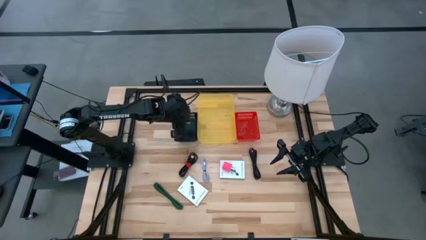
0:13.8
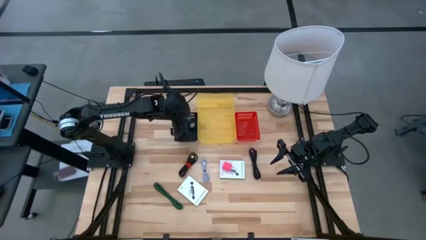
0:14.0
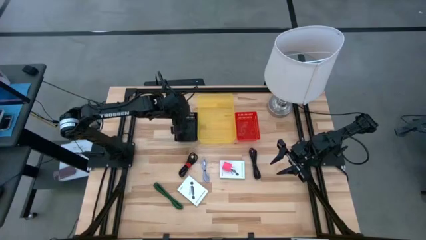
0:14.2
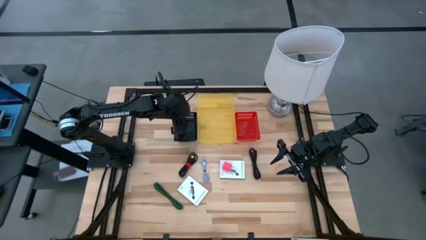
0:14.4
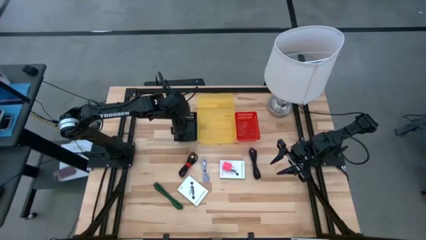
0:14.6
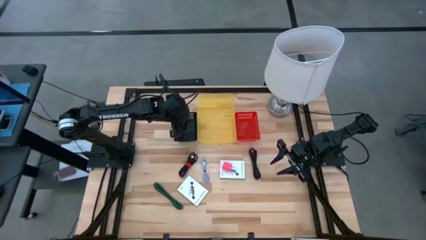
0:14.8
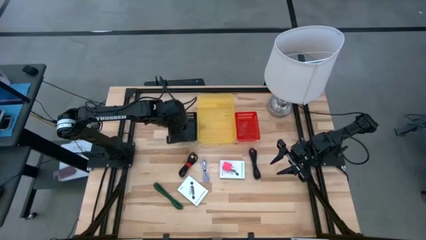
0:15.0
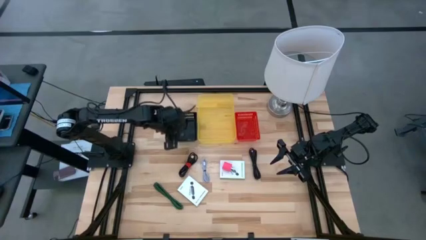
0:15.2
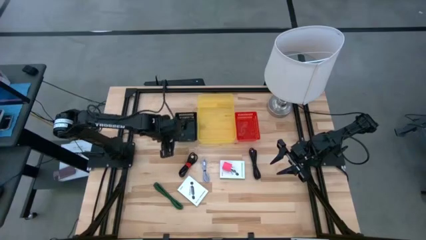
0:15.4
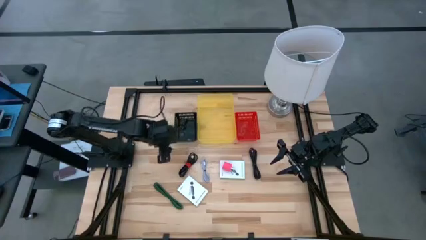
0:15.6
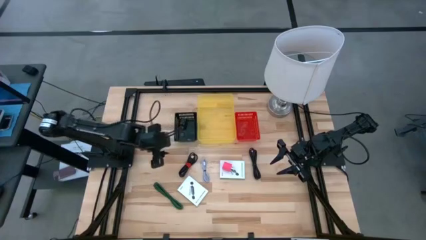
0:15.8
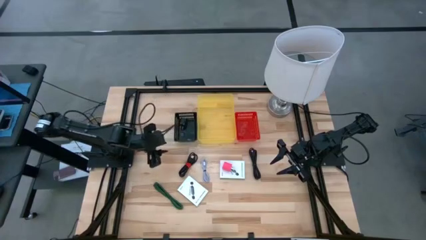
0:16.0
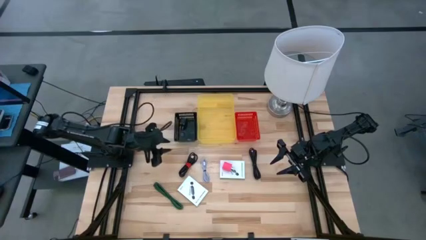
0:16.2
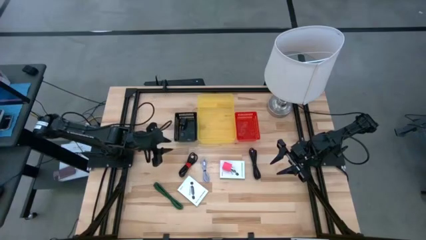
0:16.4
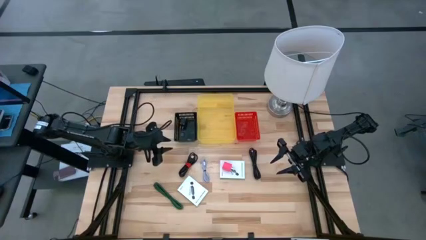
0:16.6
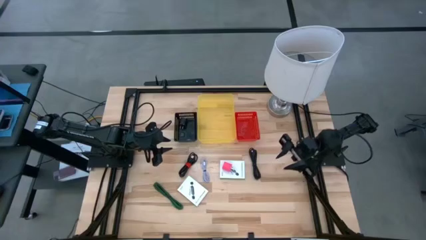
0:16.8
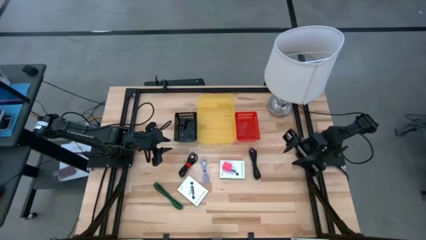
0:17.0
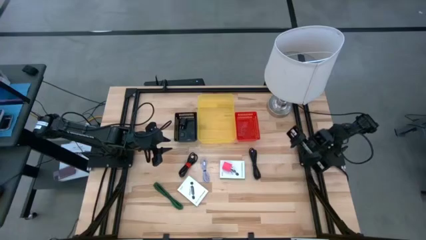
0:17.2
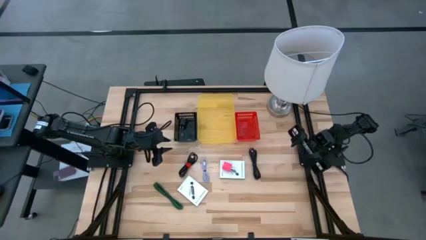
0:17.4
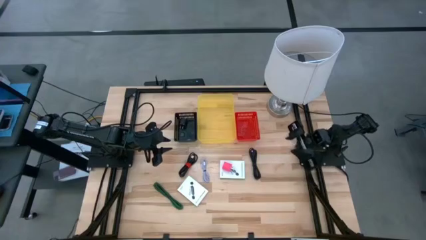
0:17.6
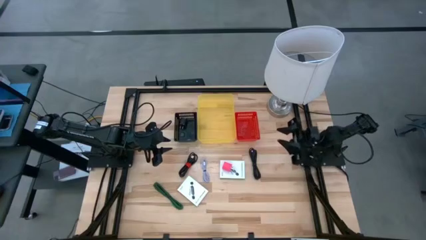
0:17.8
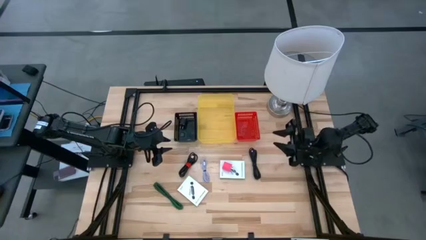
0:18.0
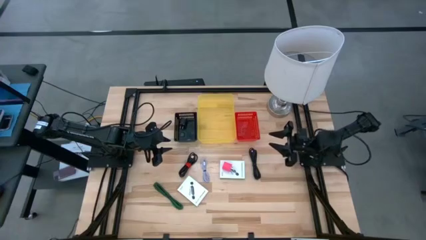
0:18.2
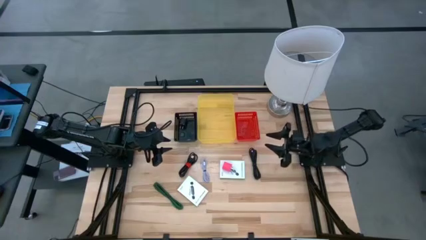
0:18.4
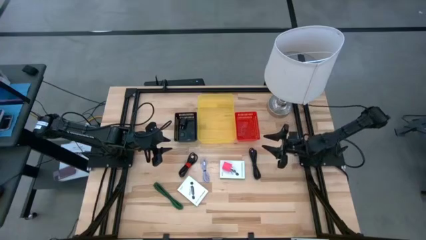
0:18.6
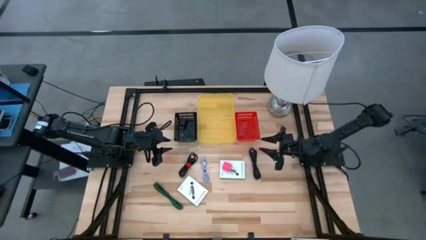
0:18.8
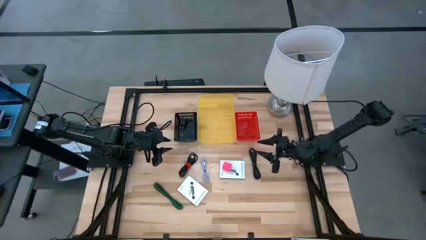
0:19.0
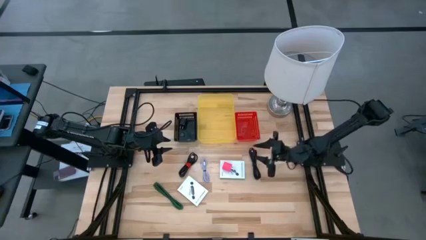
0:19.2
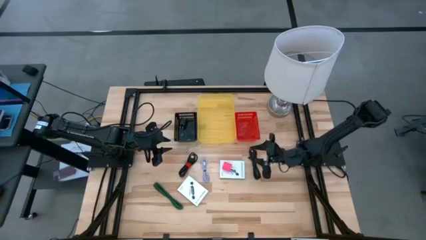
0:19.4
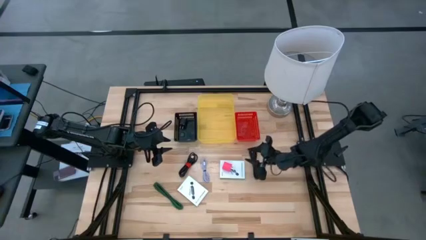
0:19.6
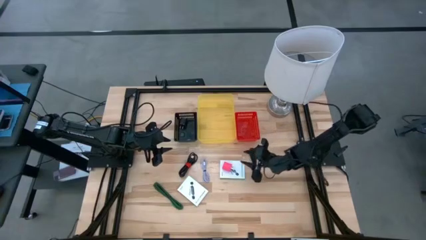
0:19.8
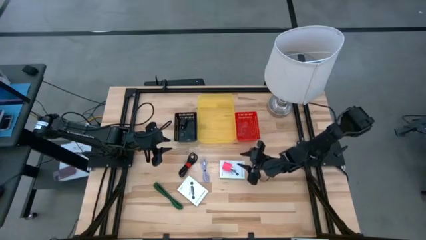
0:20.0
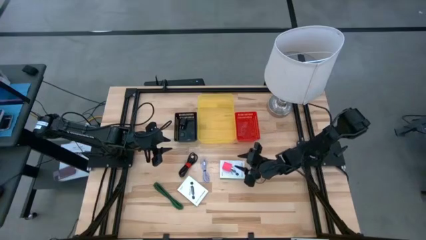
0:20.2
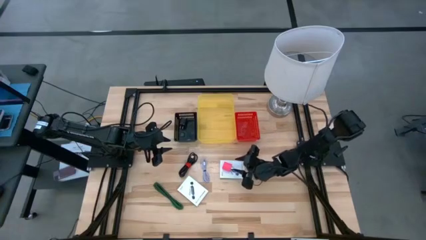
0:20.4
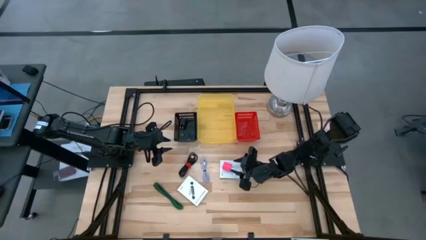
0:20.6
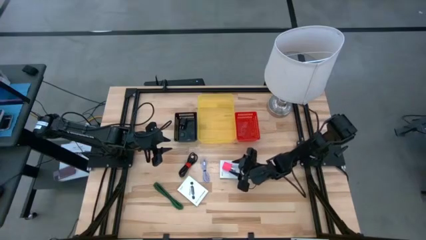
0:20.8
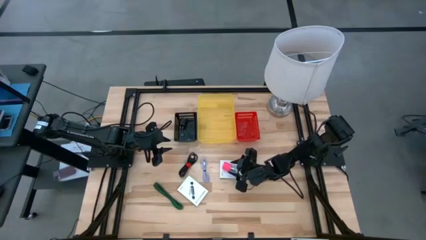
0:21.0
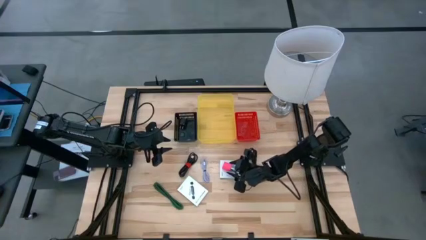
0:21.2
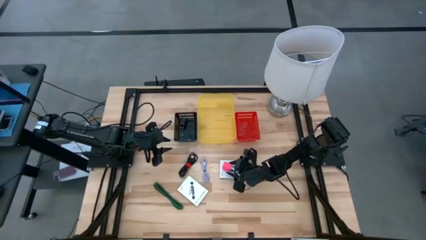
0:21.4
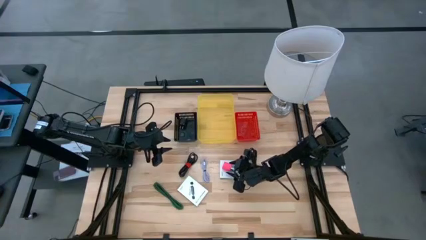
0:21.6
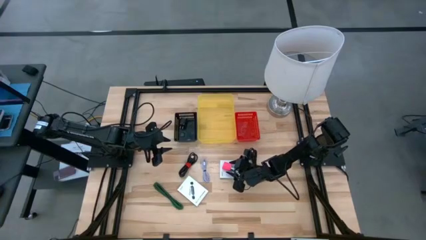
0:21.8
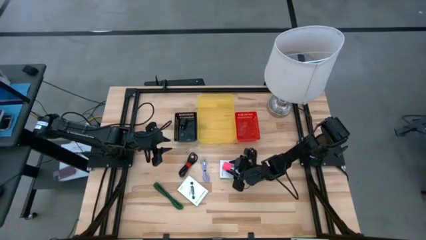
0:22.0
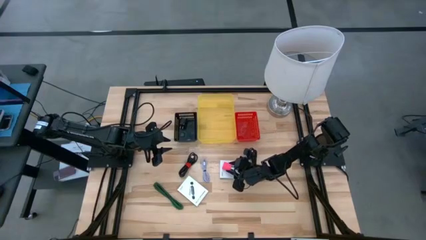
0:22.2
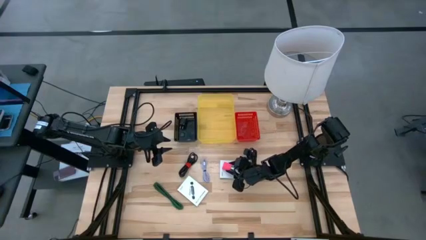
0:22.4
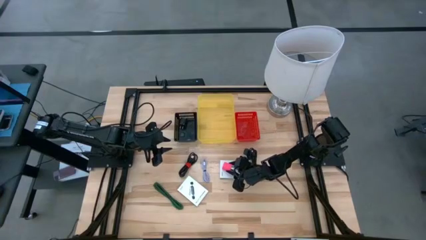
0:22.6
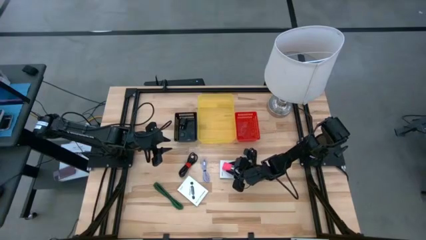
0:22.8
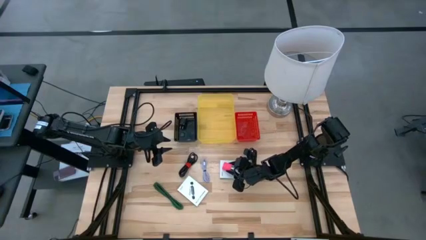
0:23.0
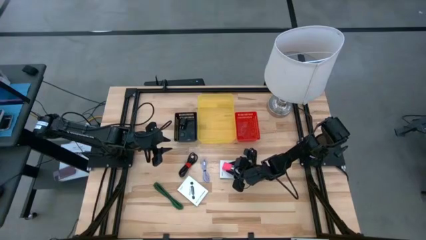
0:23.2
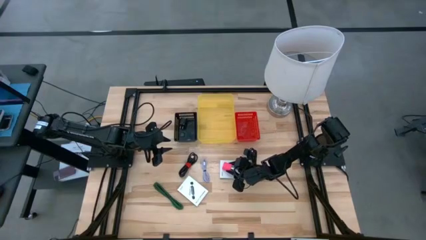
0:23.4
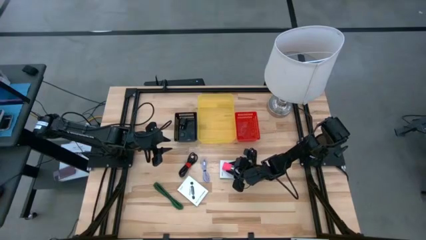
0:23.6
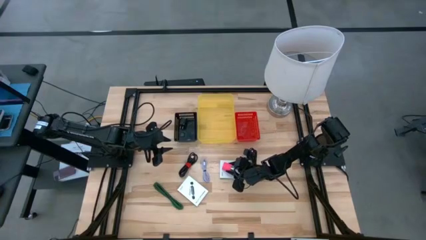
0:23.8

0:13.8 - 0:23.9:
Task: Pick and place items into bin
Put the pink charger adapter into the black bin

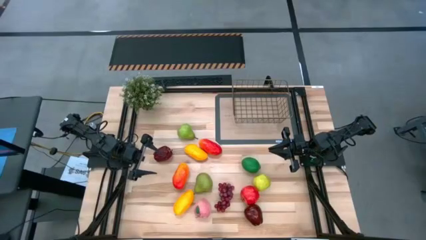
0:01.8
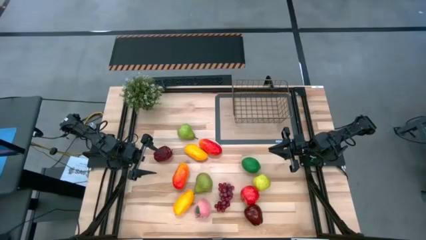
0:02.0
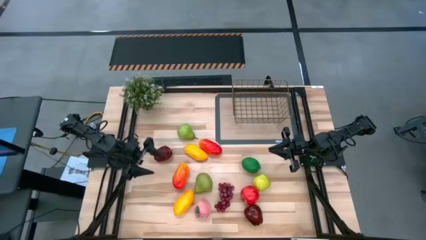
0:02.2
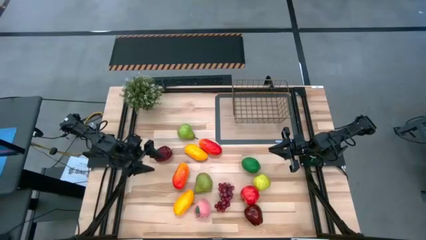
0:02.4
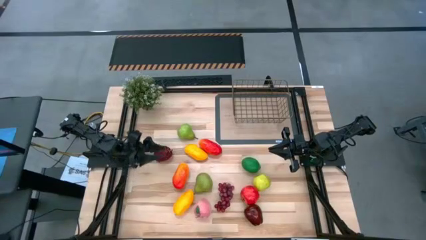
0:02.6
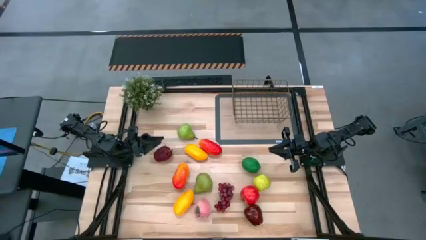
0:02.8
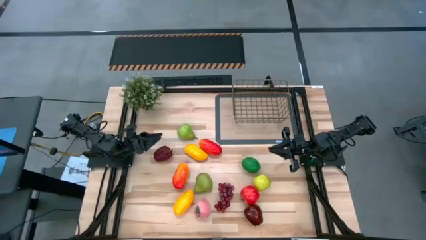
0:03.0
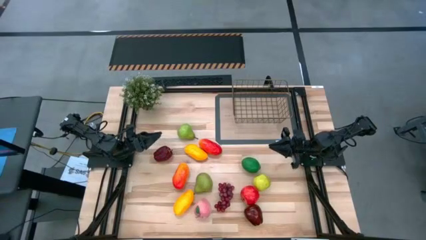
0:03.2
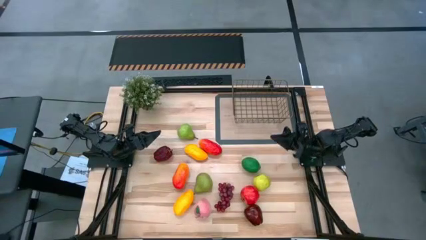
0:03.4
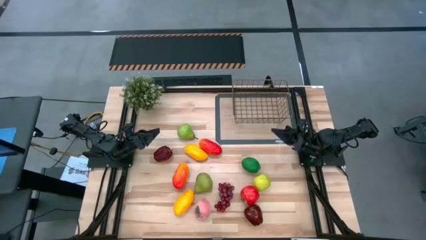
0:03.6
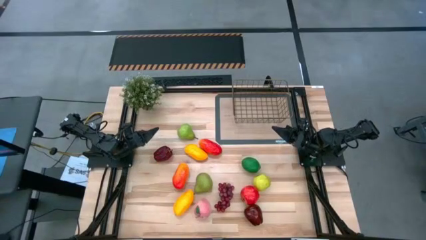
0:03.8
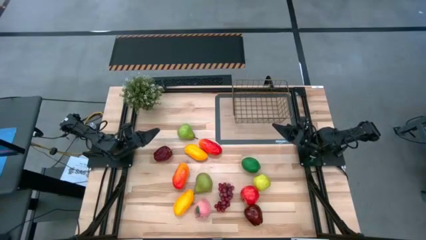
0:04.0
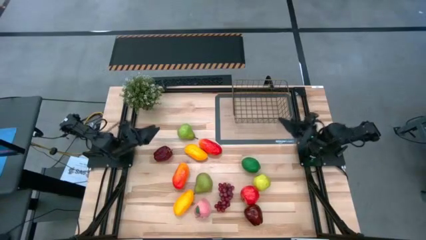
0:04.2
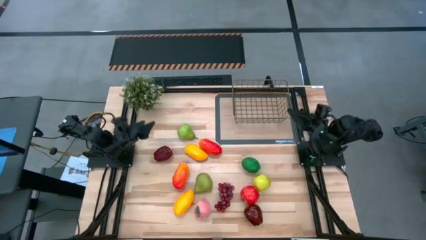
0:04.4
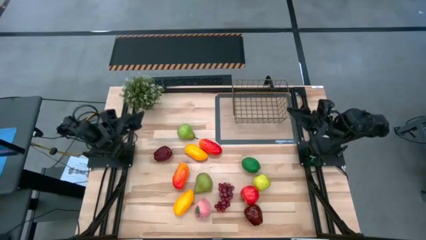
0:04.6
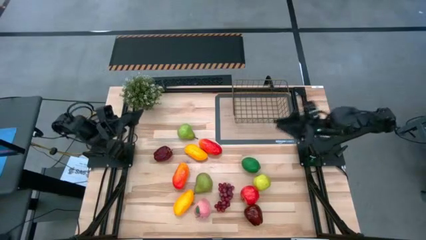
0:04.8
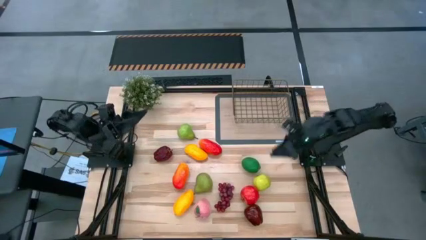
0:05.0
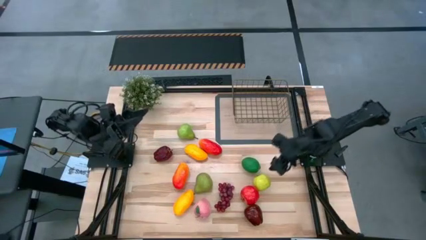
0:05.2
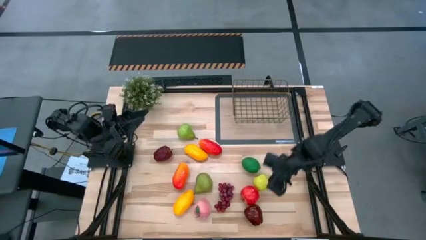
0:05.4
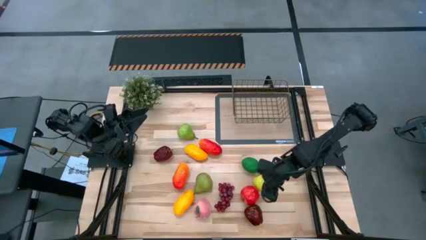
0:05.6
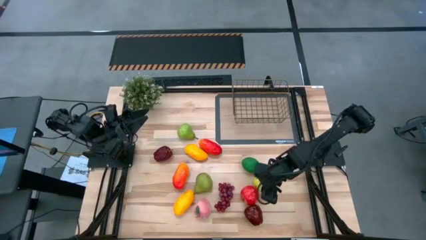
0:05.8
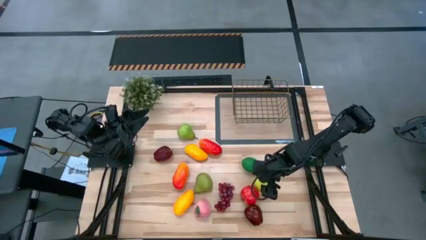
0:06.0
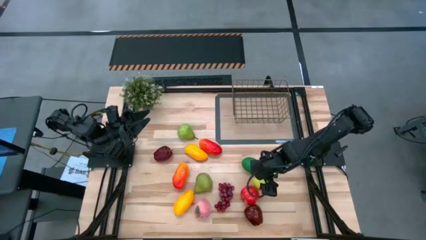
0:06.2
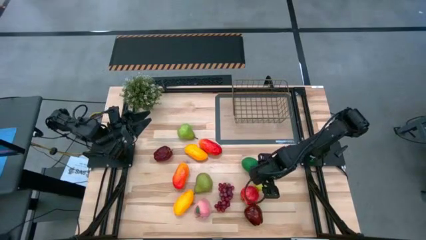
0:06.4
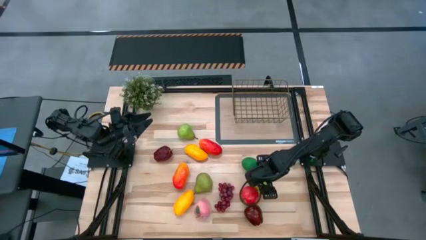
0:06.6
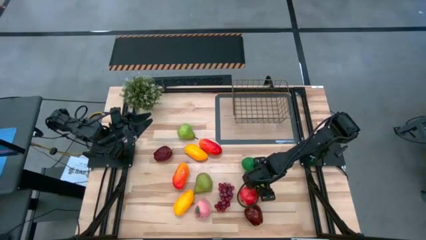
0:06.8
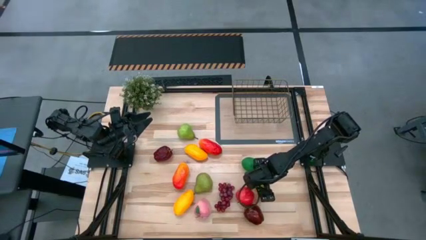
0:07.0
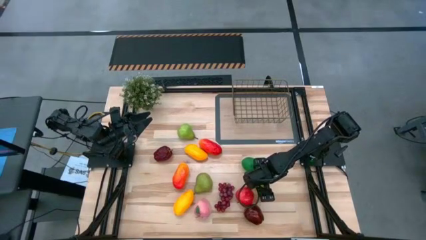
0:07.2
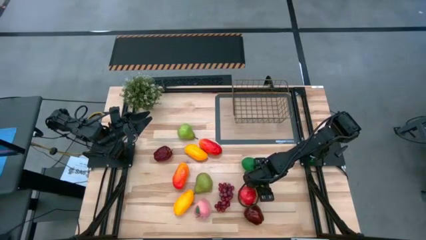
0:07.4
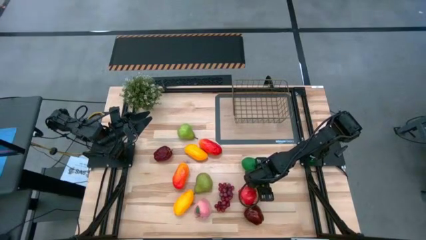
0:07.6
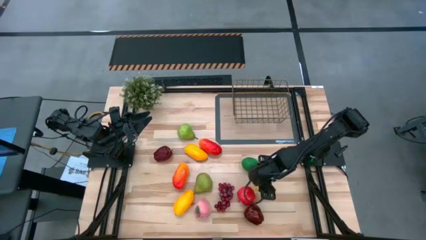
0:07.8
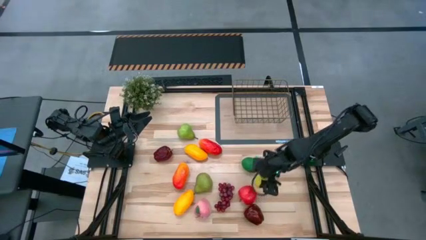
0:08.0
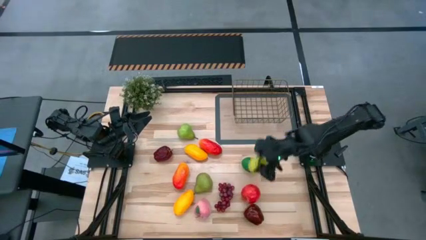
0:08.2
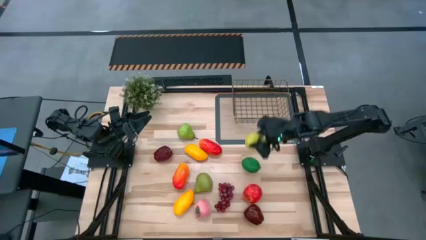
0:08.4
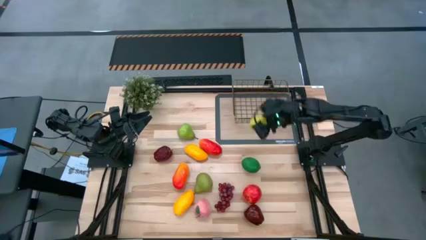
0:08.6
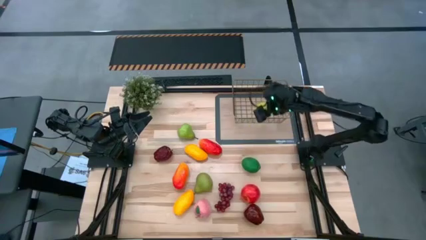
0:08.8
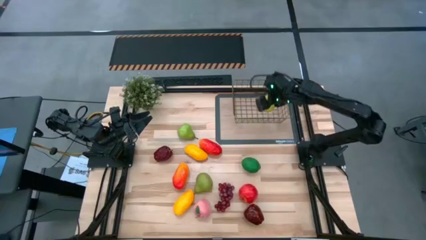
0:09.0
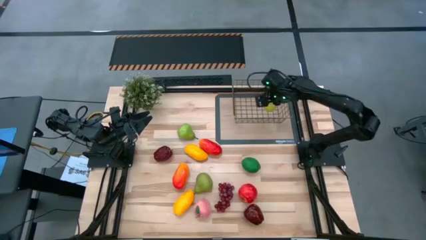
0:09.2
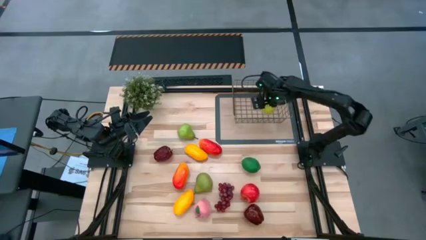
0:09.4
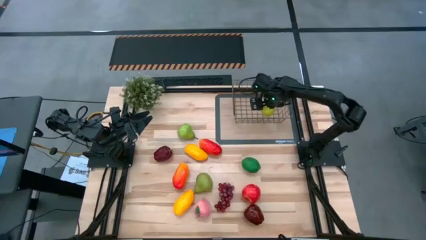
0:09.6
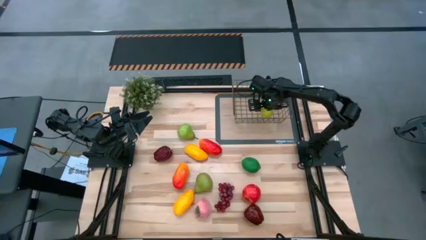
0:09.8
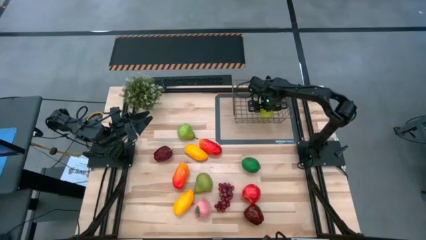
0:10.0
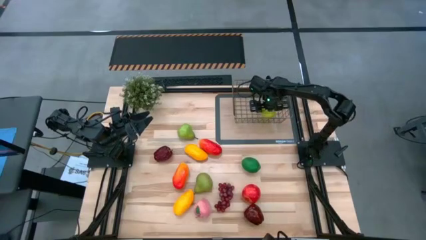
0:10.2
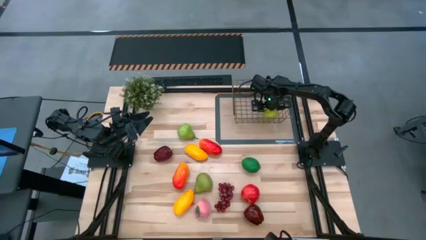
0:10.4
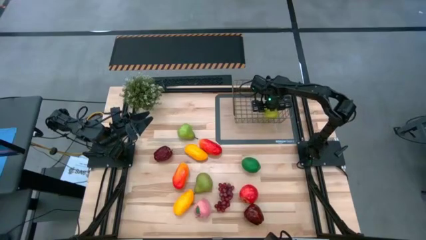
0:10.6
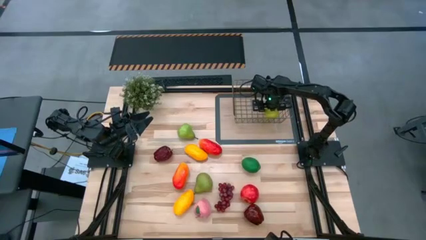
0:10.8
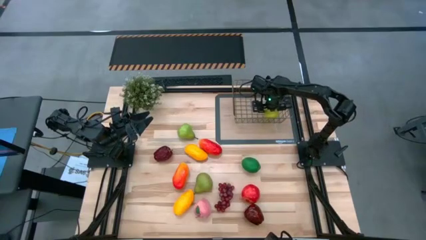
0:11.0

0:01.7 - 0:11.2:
Task: Build produce basket
Put the green apple into the gold wire basket
